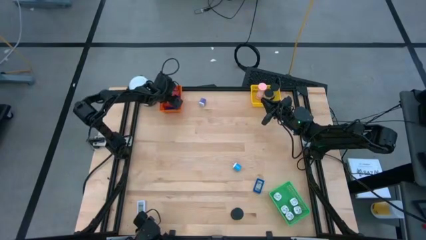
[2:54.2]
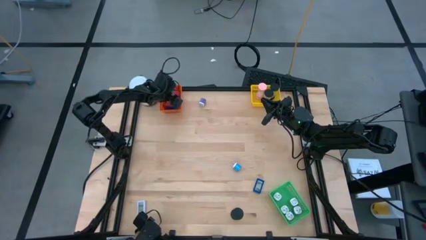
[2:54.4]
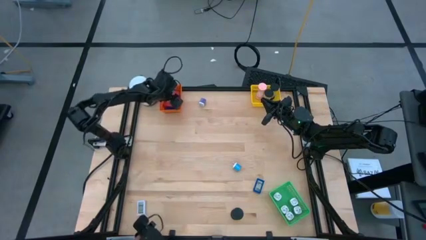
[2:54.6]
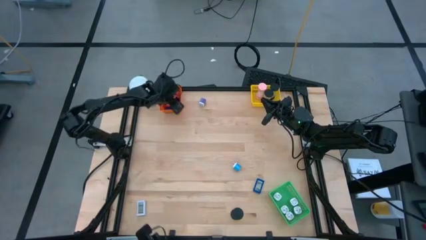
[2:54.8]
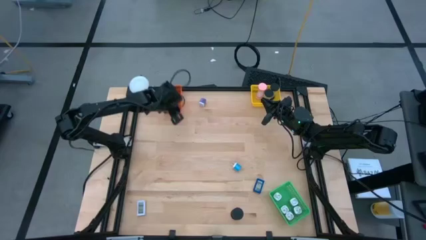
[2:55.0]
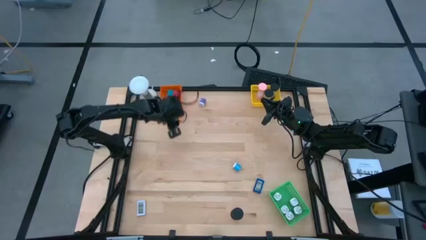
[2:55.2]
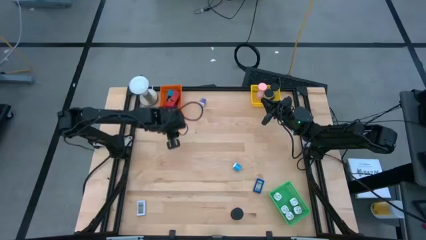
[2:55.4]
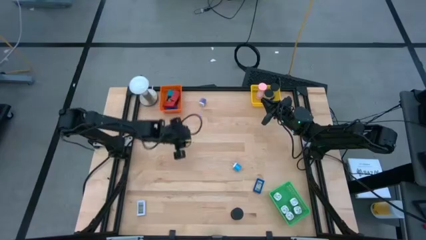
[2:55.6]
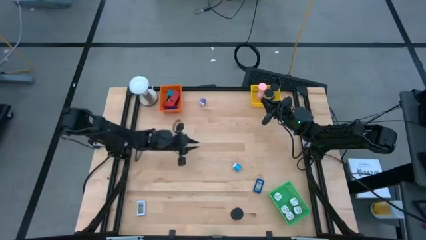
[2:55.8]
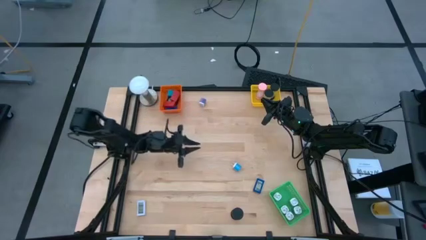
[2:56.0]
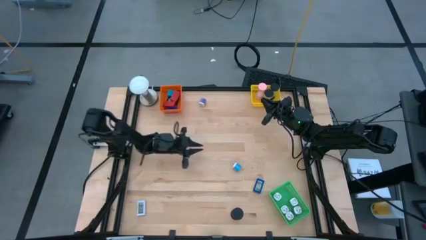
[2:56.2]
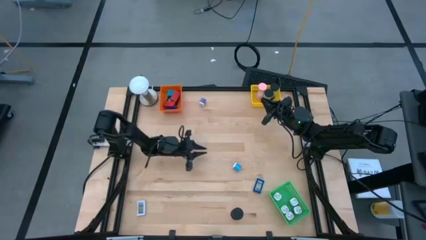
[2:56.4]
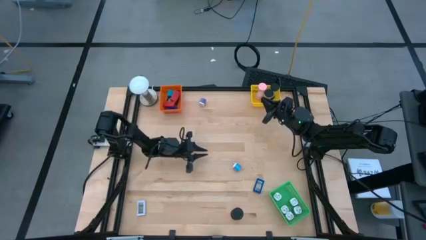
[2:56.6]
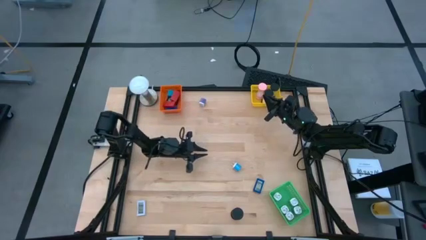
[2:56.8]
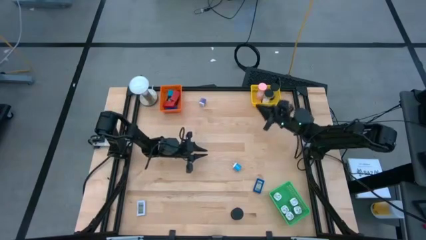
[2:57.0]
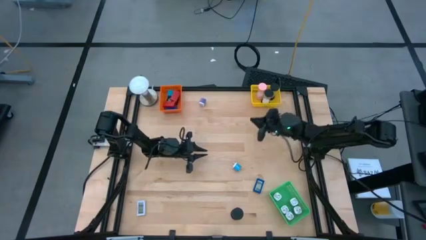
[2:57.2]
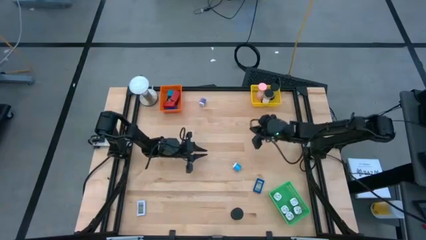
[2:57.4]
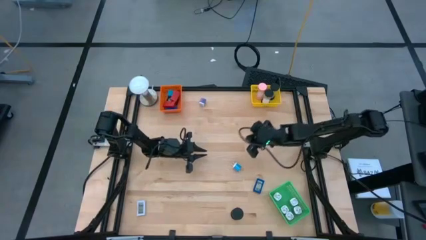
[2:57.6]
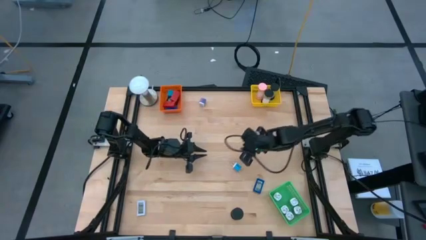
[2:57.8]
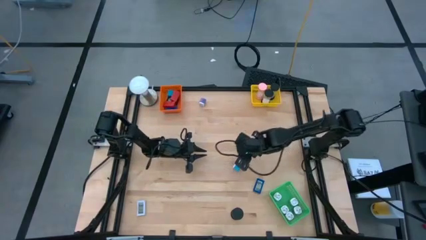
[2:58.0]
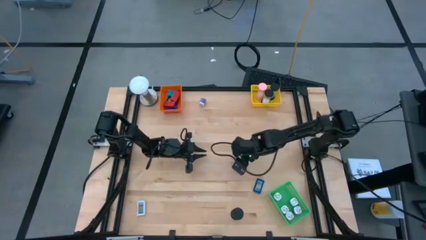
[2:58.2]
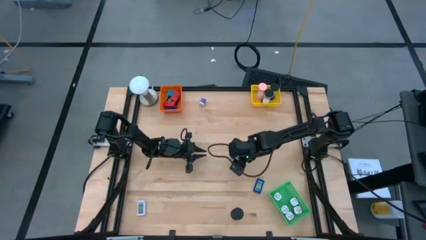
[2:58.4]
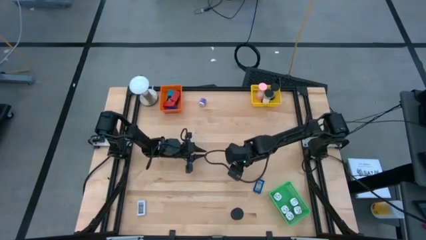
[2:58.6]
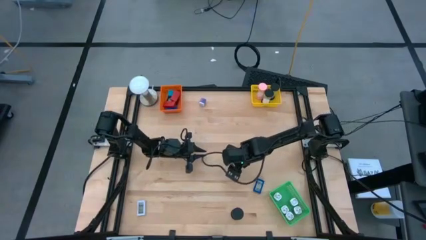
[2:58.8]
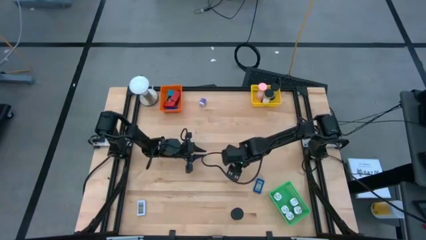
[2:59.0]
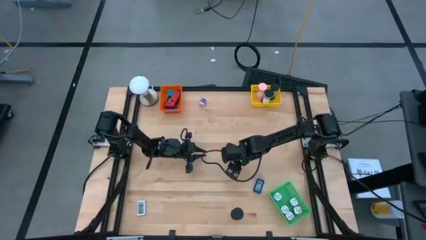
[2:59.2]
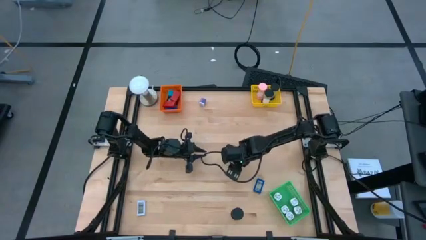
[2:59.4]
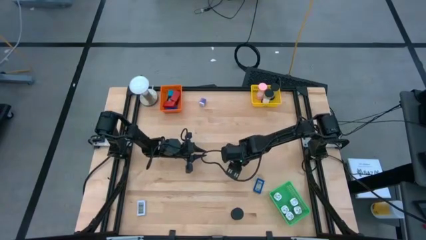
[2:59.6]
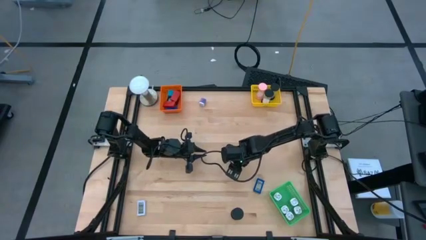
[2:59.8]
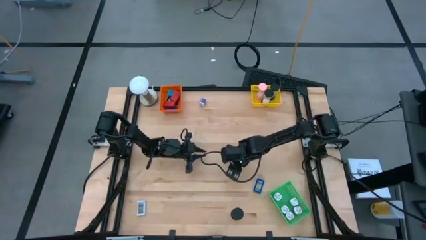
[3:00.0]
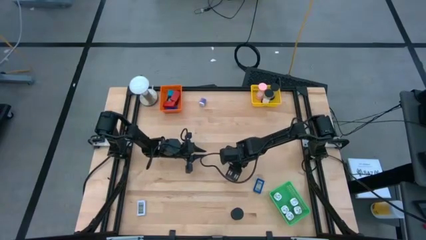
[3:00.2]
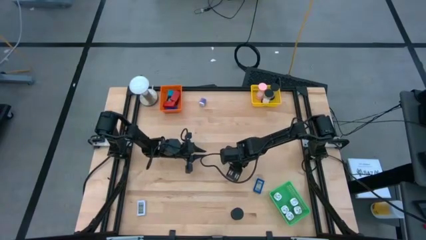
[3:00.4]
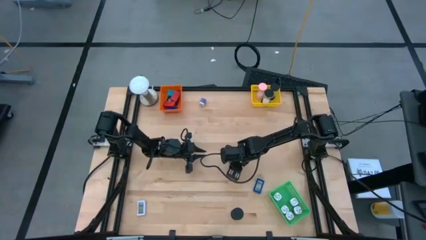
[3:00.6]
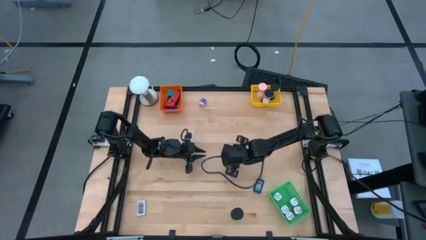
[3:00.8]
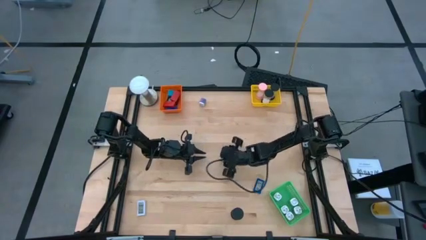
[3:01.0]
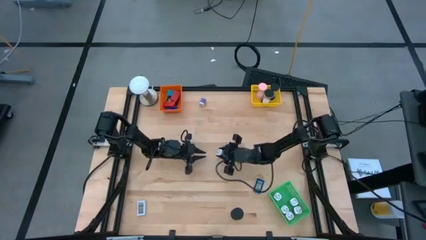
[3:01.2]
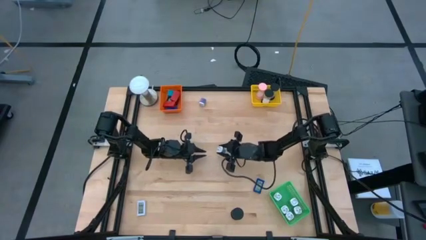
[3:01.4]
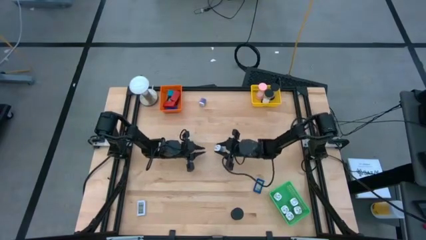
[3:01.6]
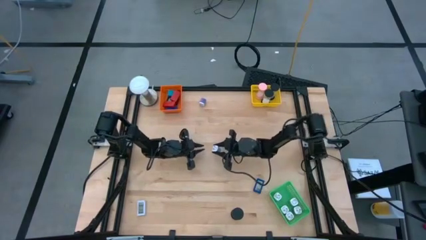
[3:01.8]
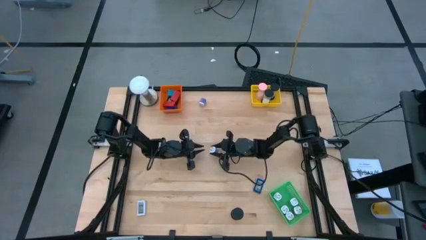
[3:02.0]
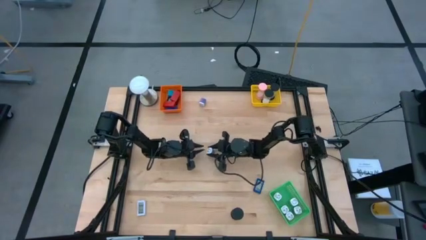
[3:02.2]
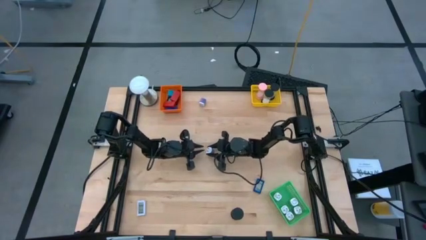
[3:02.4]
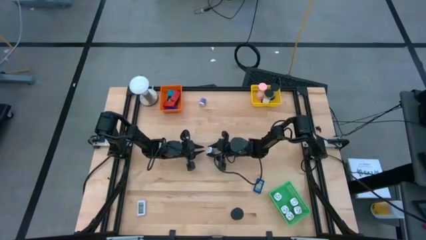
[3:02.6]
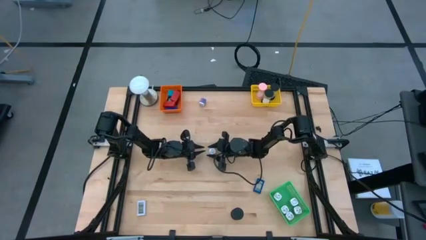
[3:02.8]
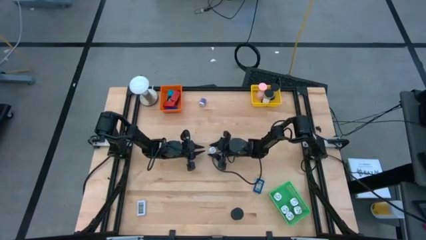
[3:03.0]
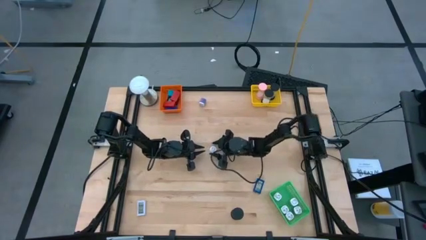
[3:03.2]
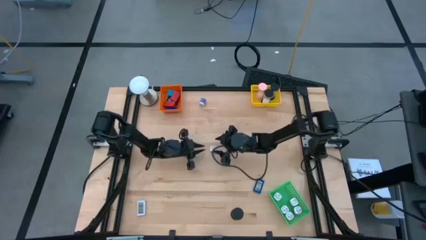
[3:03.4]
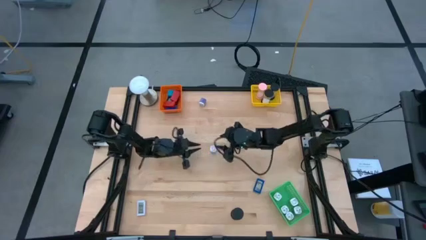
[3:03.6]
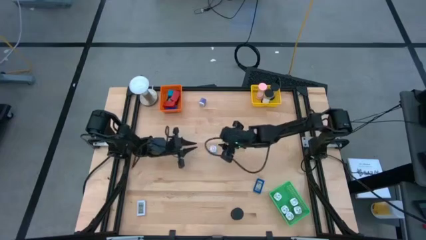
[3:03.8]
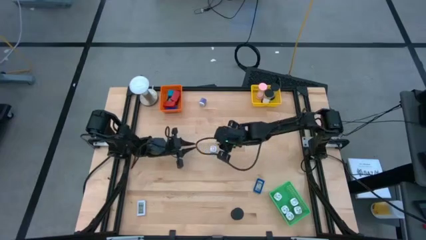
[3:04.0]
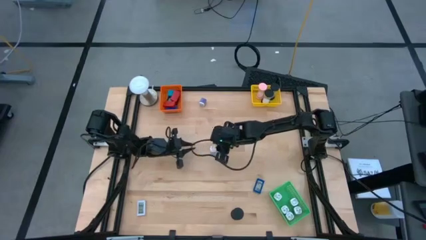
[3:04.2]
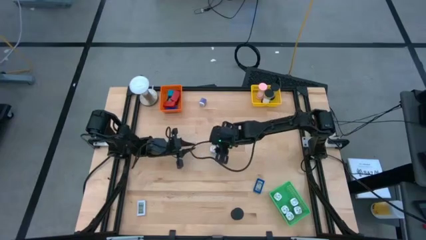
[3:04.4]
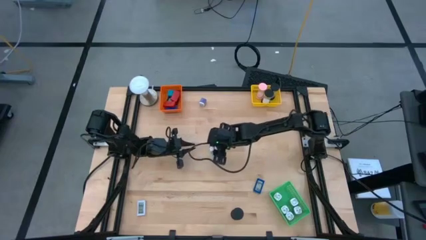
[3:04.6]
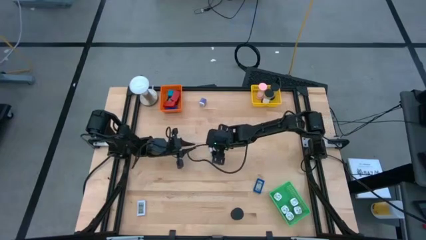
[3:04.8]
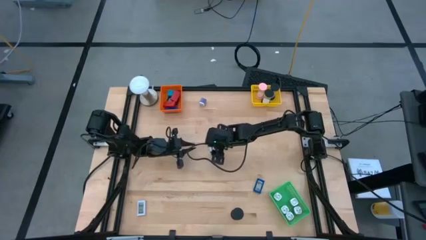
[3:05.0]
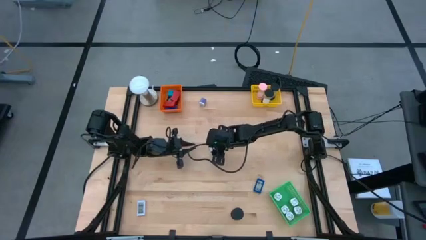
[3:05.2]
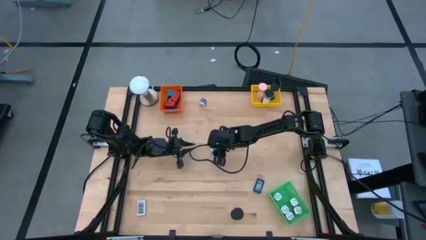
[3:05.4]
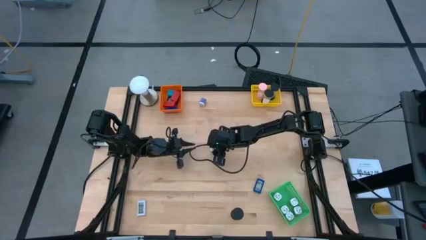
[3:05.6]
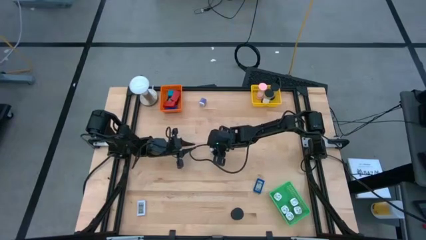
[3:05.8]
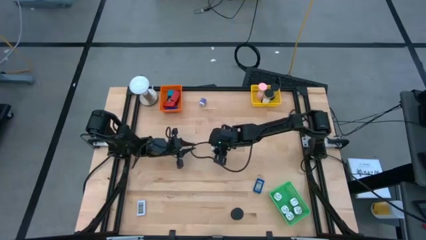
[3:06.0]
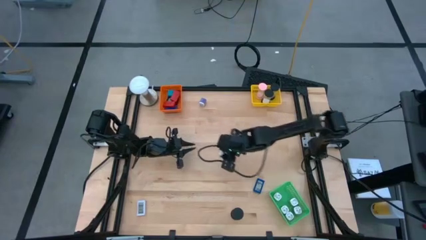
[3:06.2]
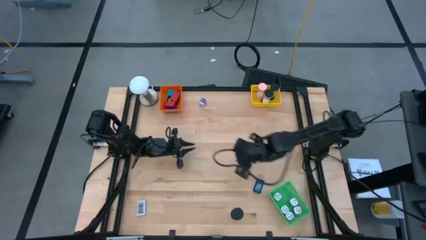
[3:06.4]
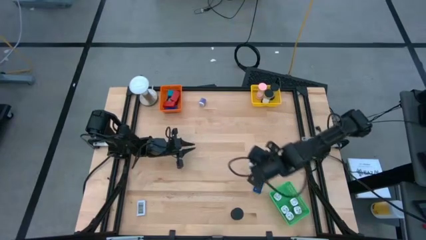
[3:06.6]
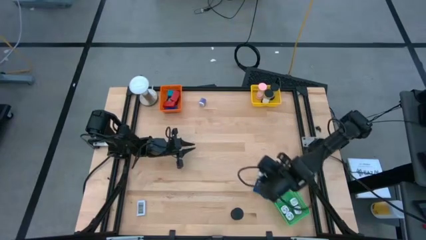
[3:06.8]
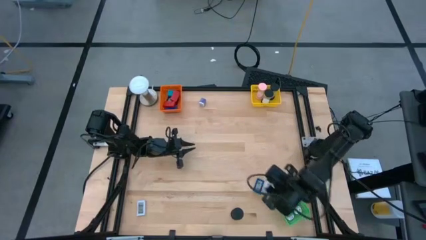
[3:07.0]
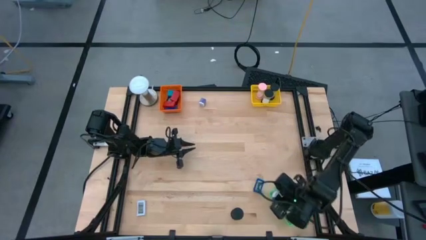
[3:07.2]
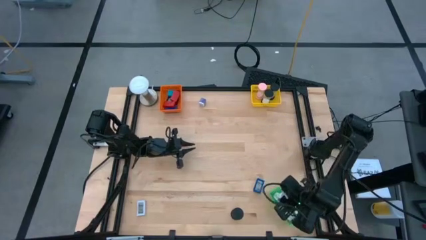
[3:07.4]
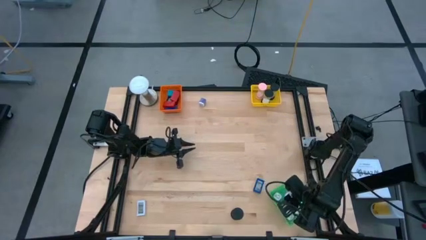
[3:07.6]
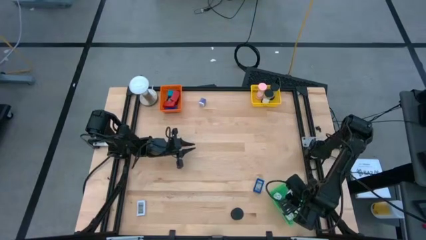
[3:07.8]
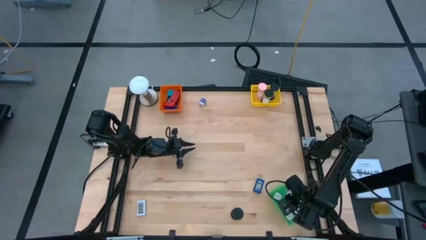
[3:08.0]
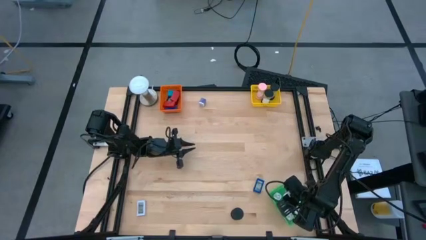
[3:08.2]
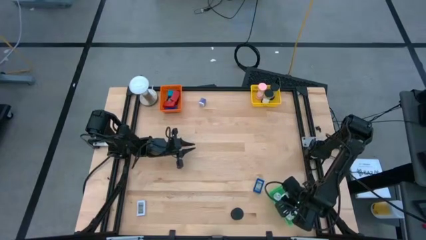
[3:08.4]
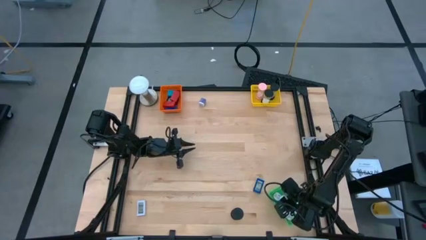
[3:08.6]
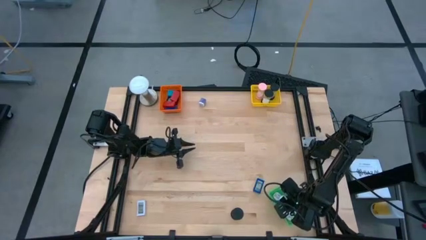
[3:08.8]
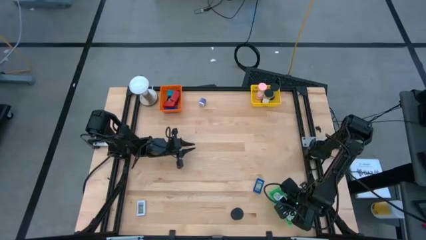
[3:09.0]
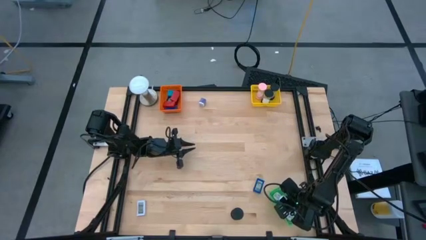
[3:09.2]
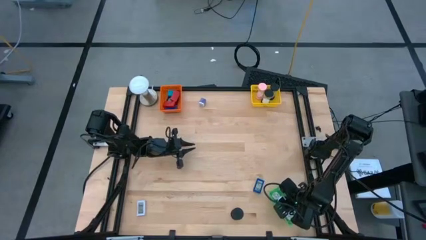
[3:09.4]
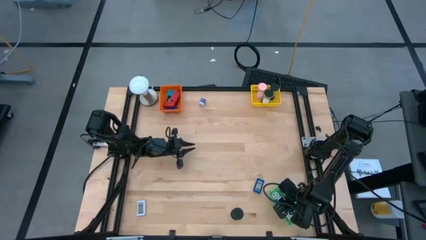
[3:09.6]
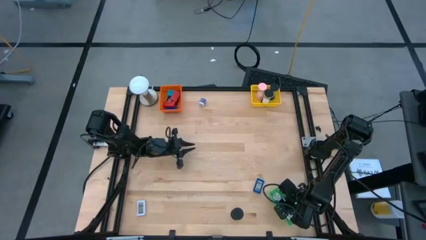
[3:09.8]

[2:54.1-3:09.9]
Task: Pick & Place Office items
Put the light blue charger adapter into the green bin
